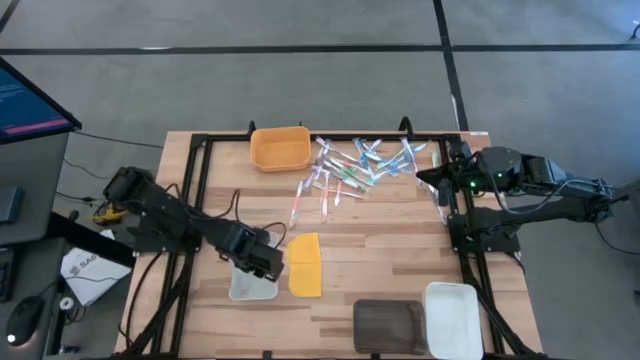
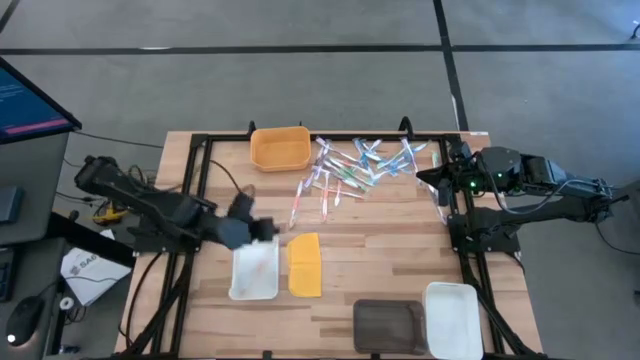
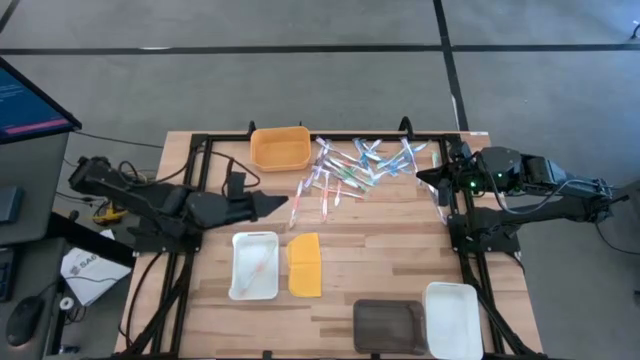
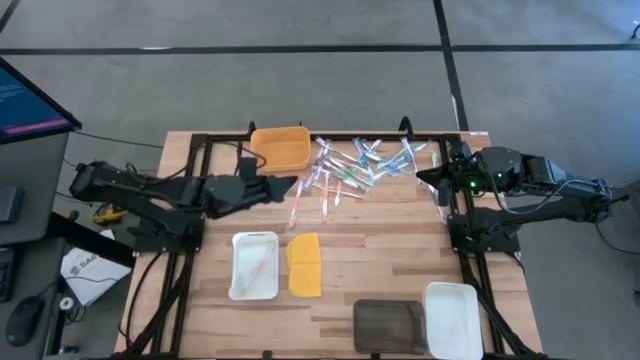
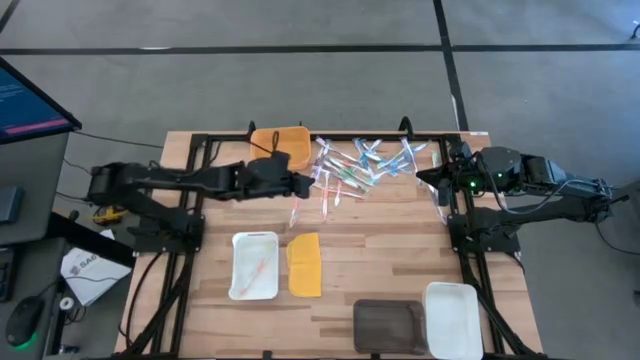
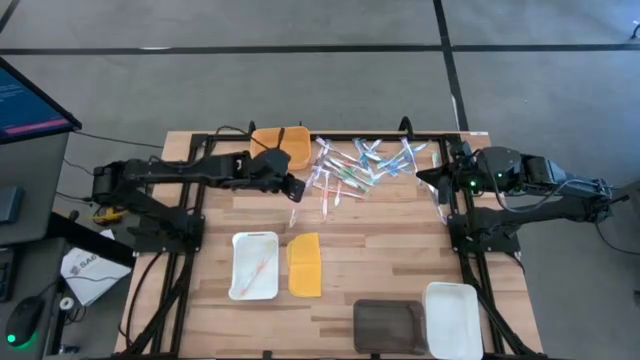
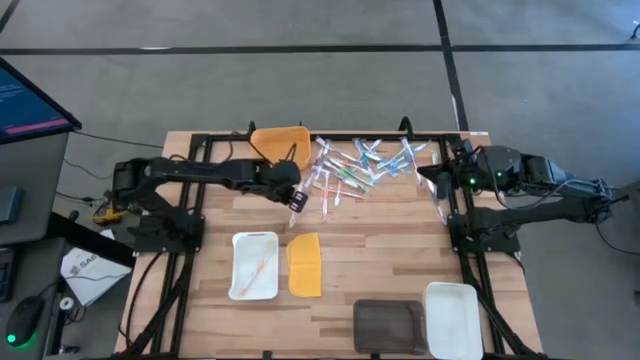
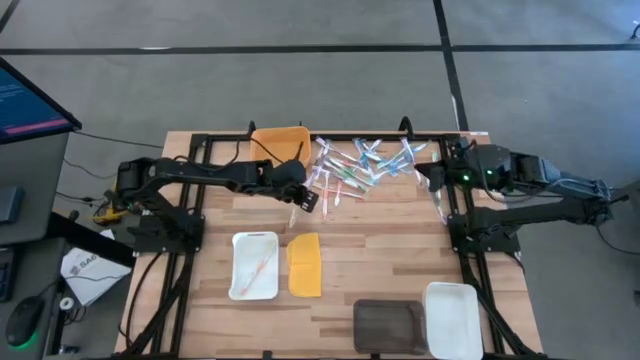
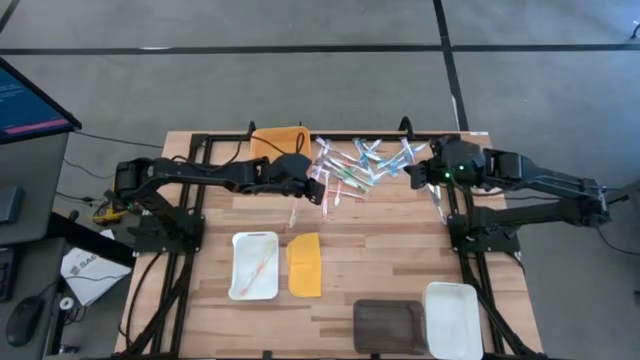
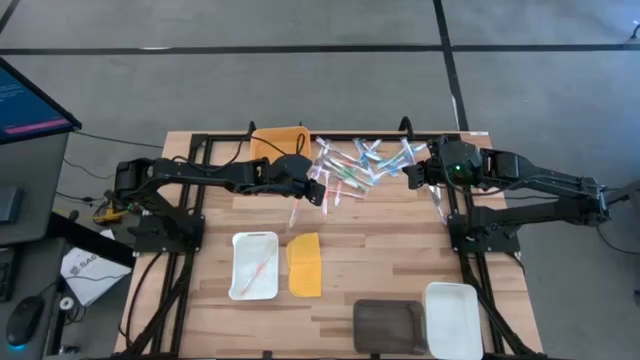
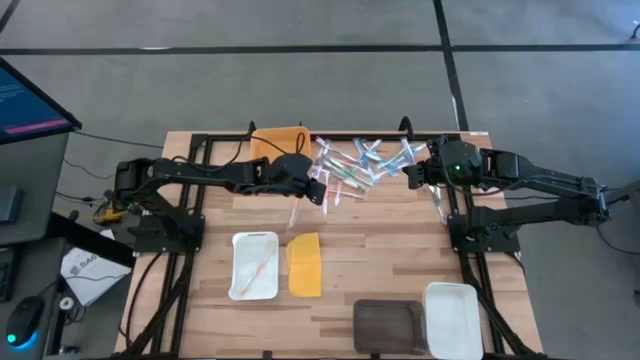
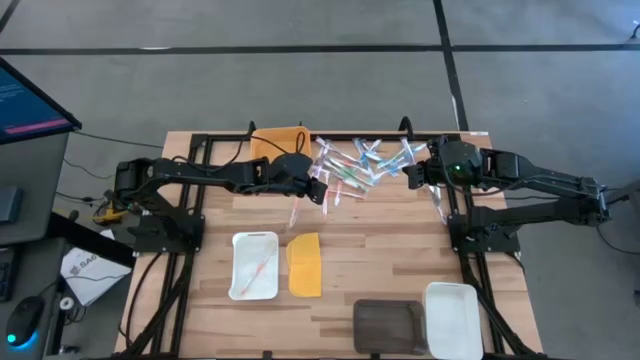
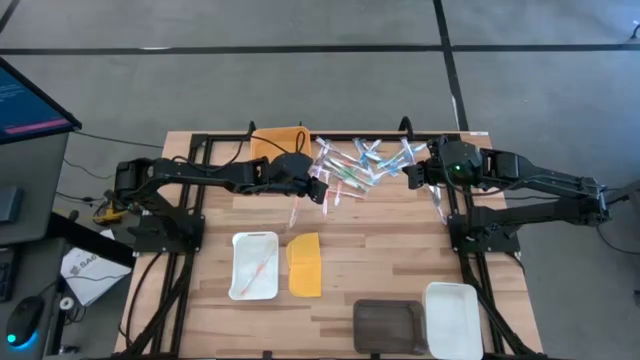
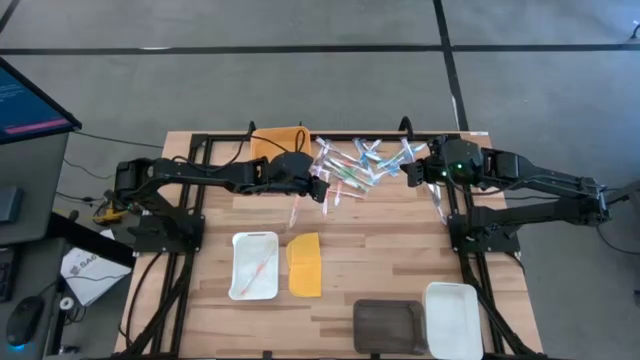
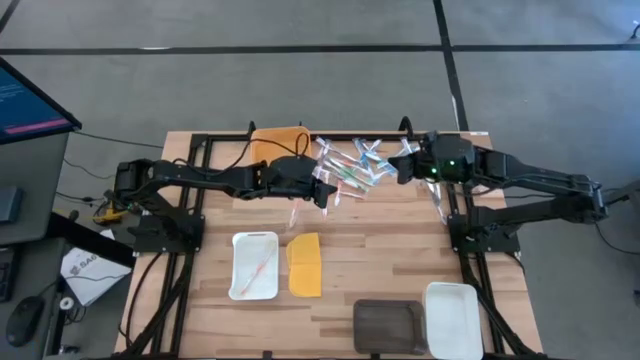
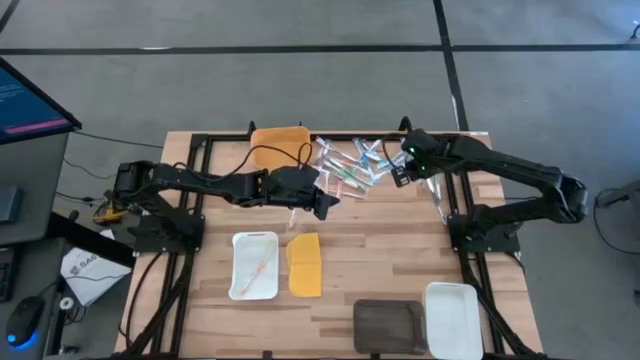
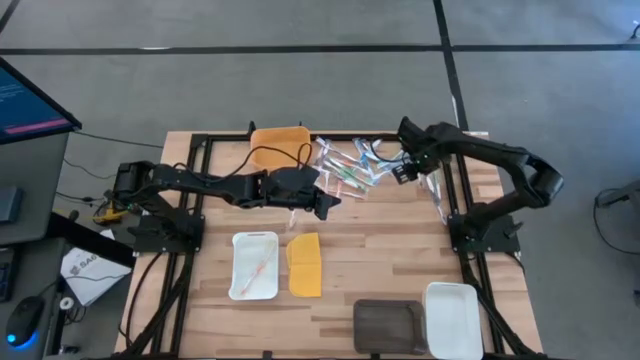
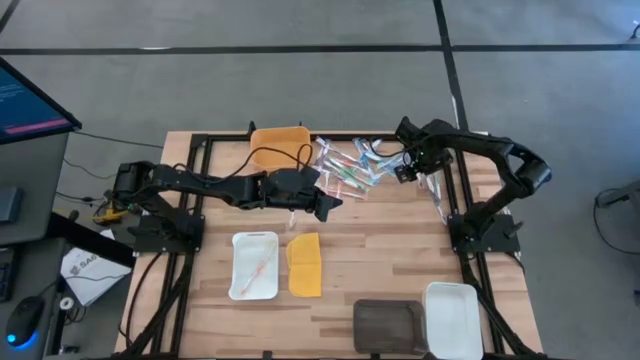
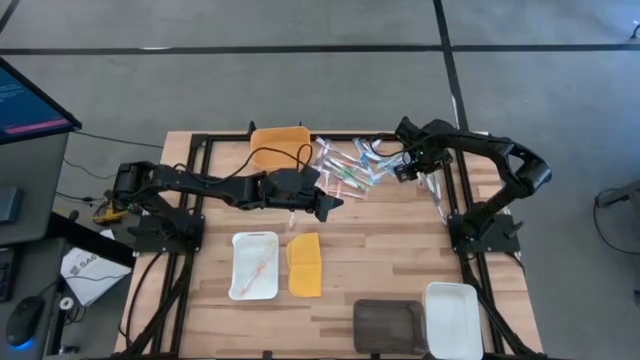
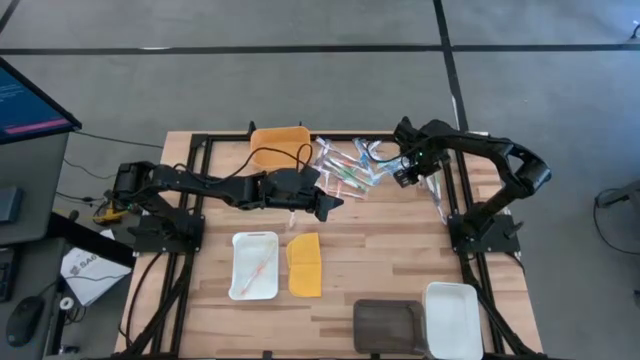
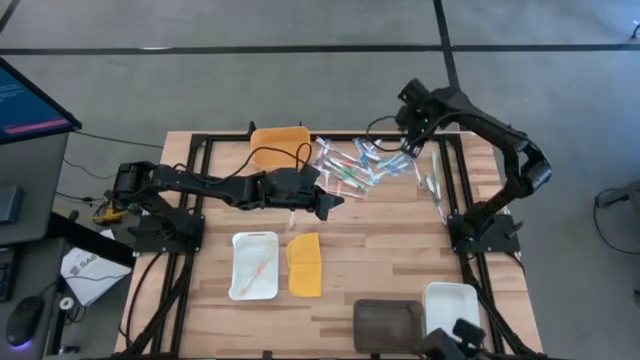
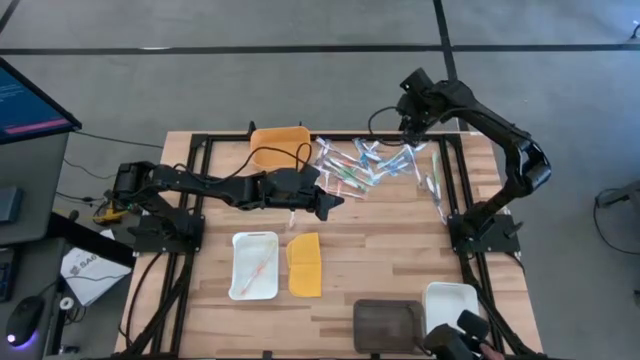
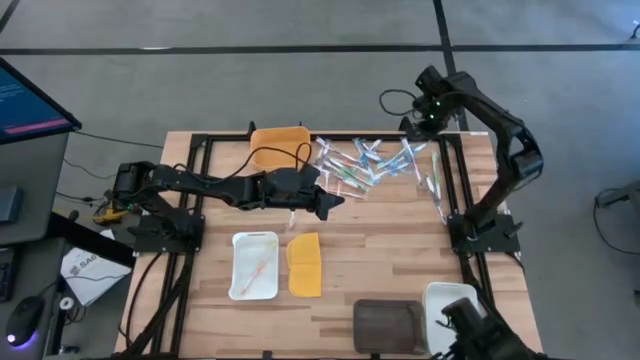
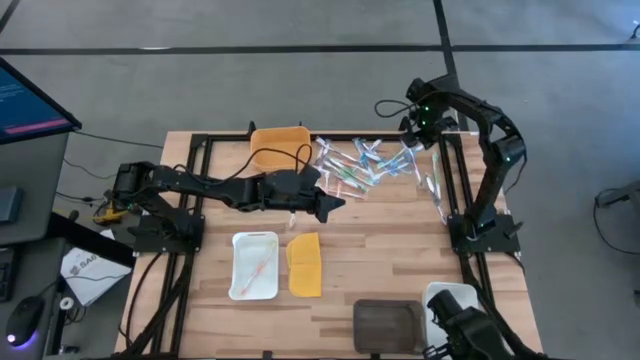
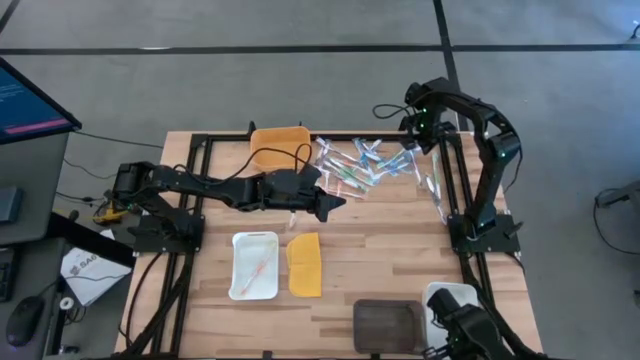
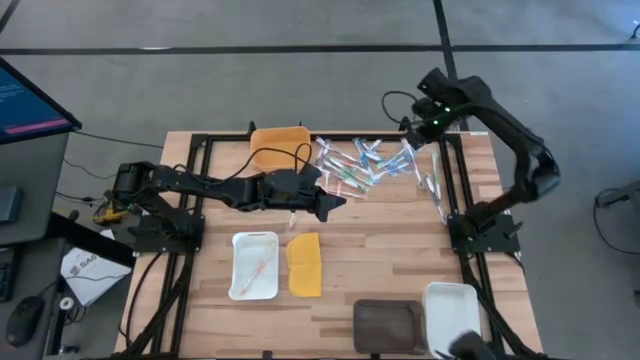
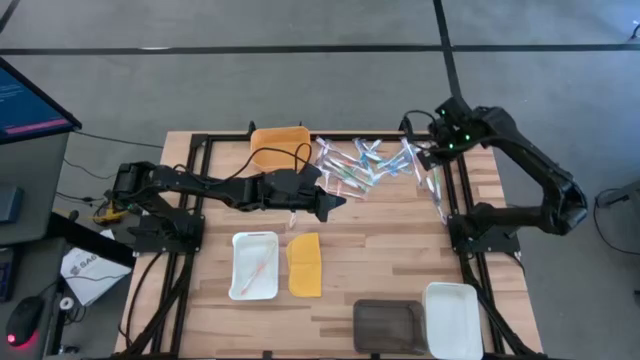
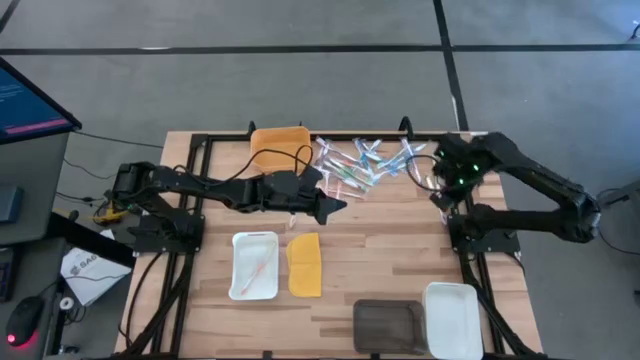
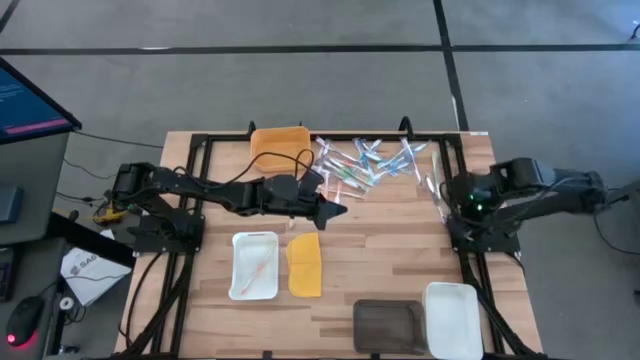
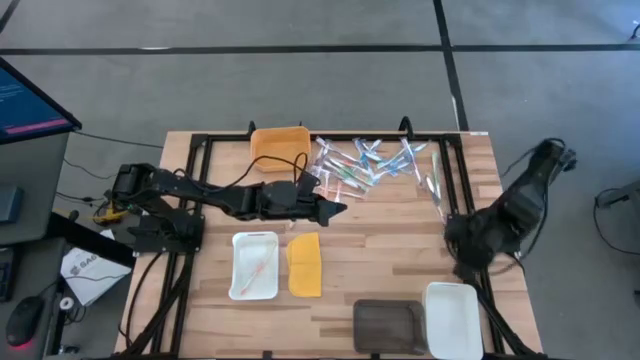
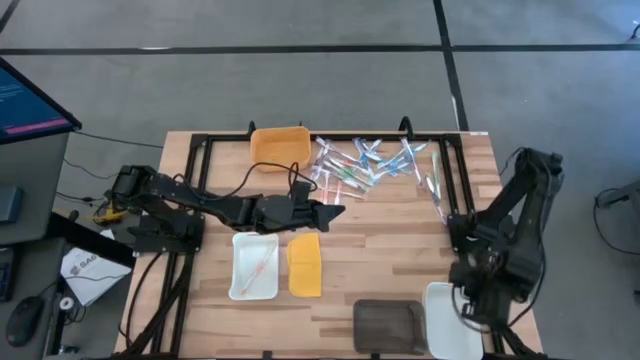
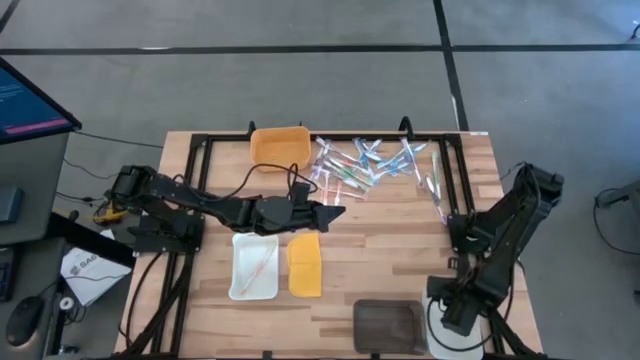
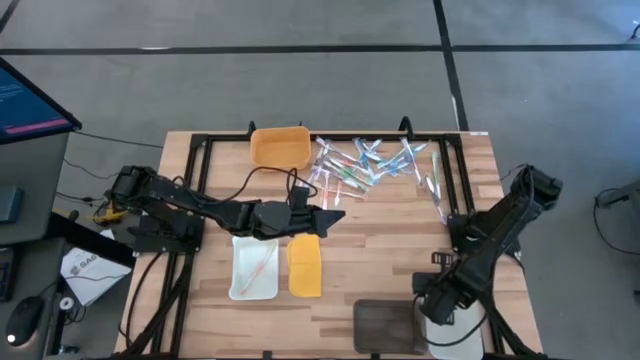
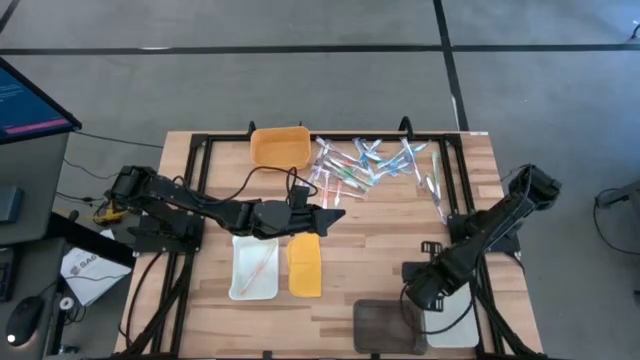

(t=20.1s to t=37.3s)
Task: Pick & Place Toothbrushes
Move the bottom white bin to the middle left of the table

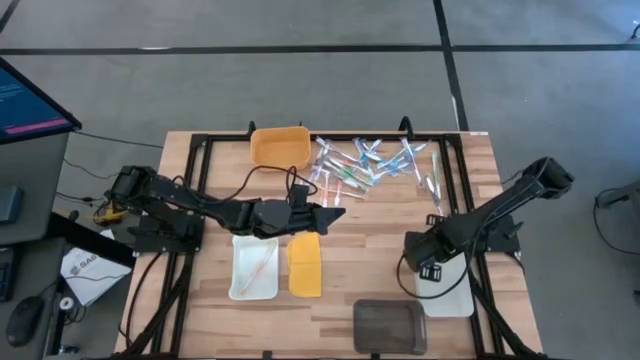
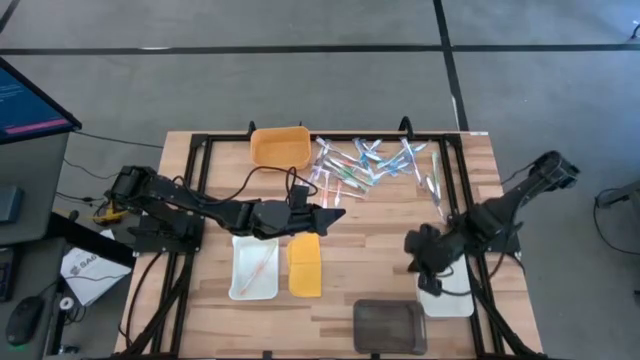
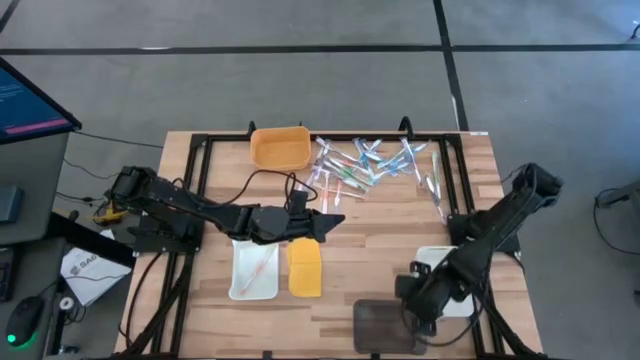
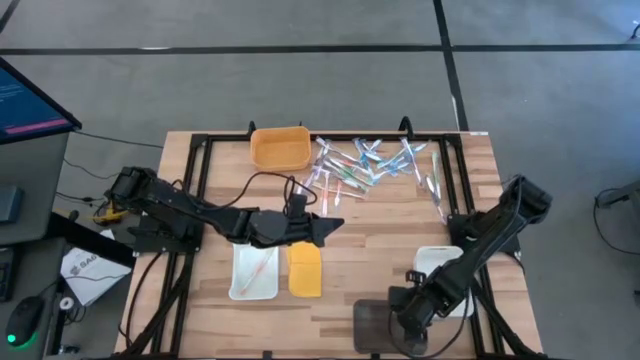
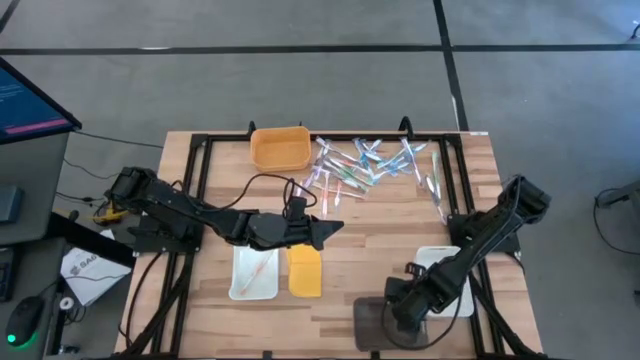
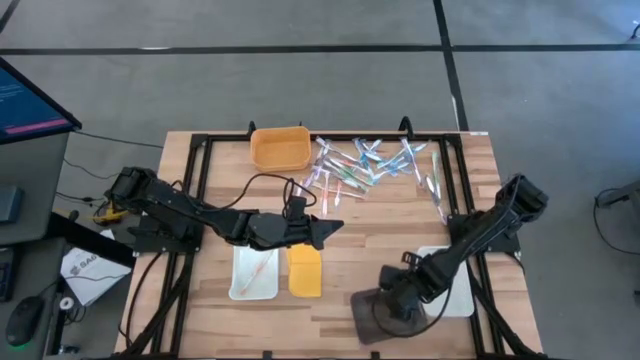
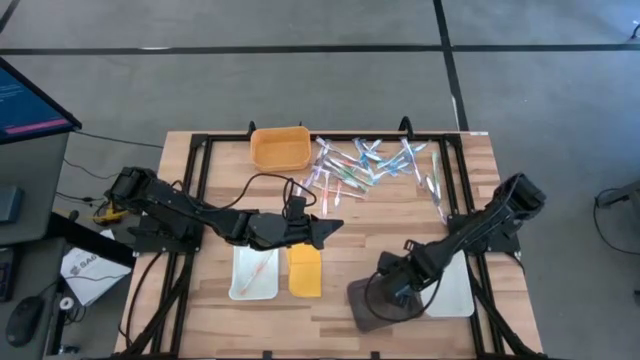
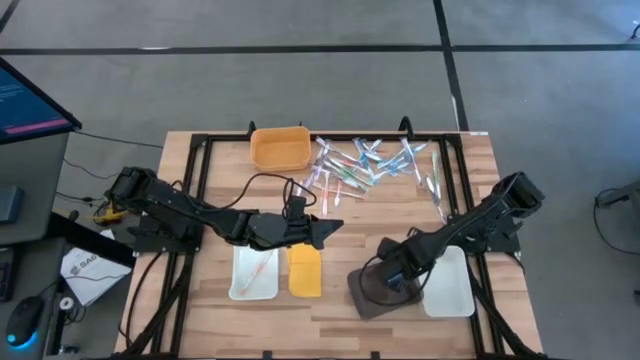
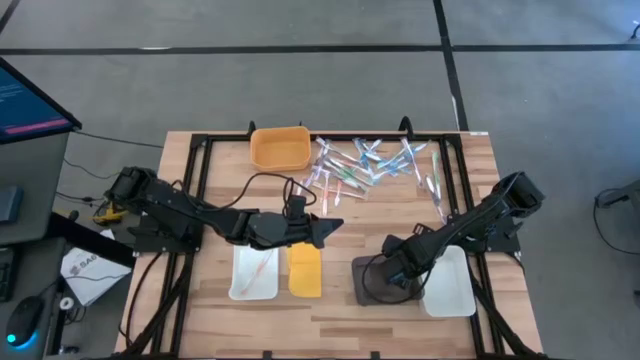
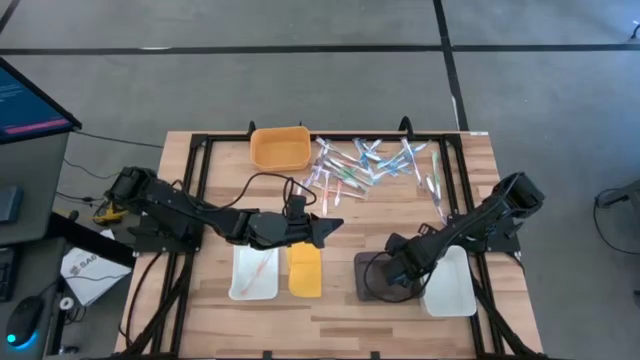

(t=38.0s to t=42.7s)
Move the black bin to the bottom right of the table
